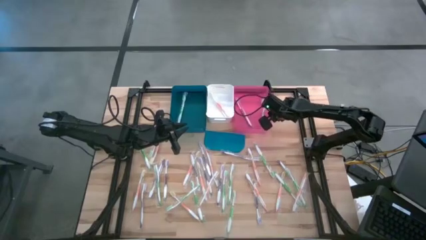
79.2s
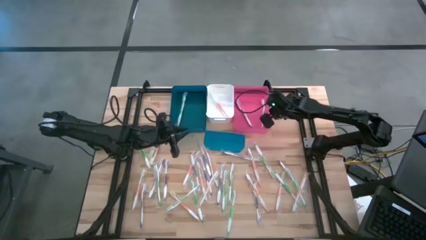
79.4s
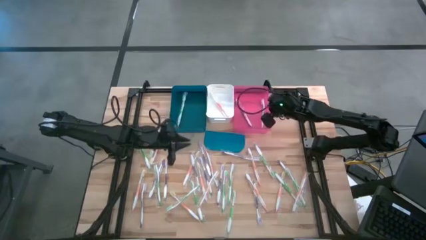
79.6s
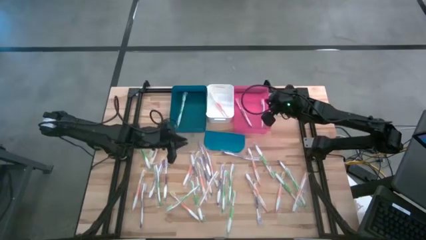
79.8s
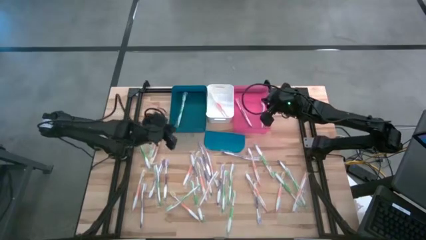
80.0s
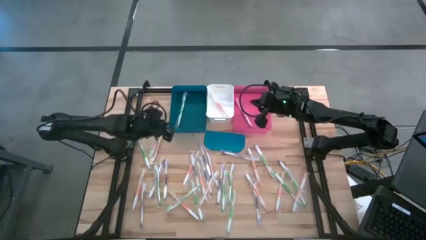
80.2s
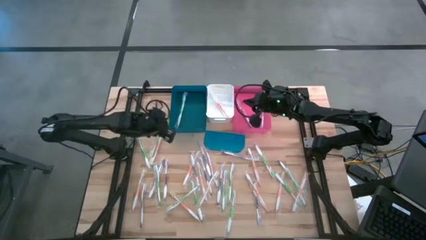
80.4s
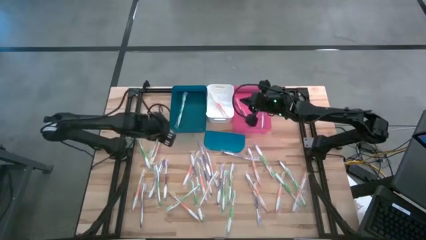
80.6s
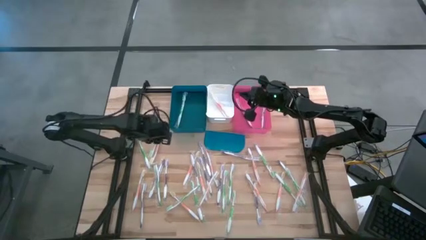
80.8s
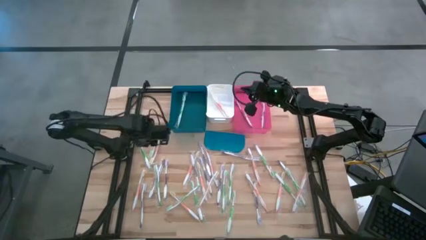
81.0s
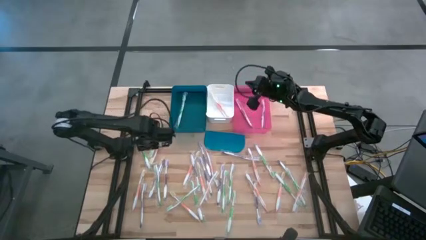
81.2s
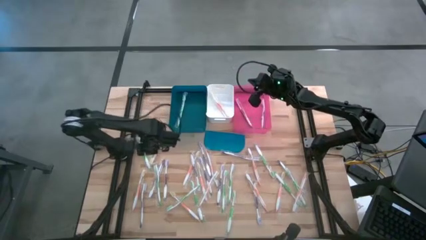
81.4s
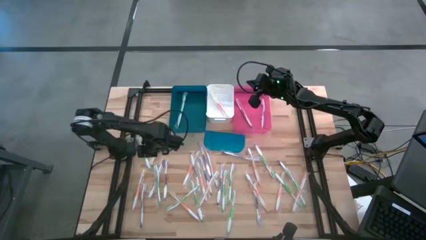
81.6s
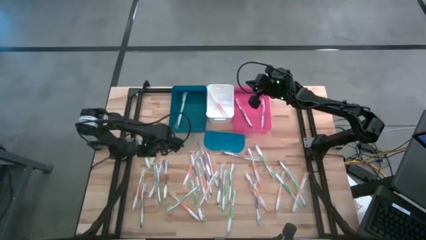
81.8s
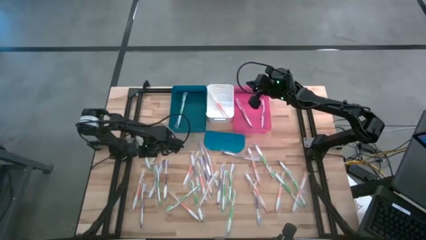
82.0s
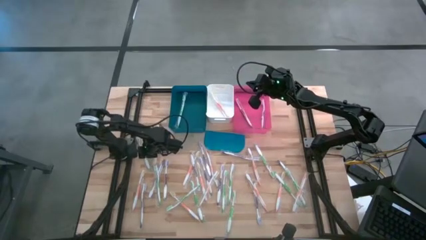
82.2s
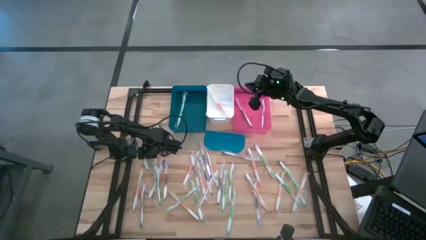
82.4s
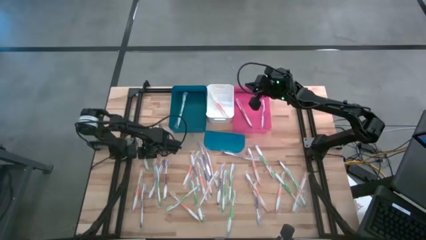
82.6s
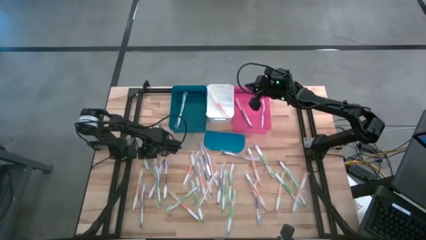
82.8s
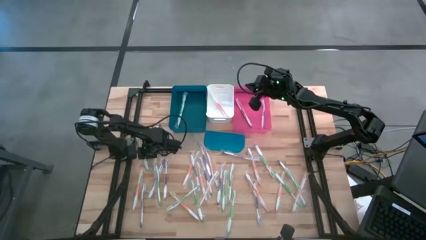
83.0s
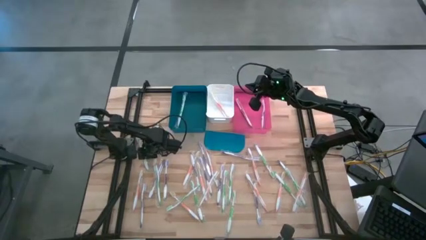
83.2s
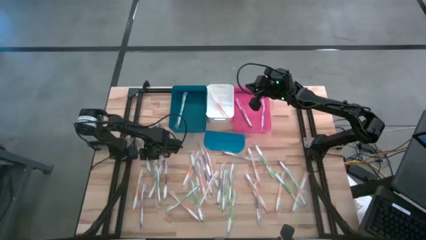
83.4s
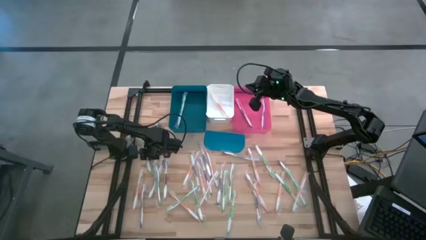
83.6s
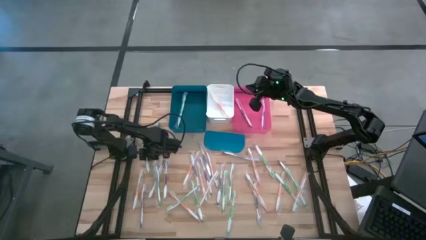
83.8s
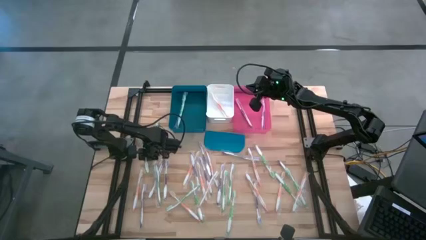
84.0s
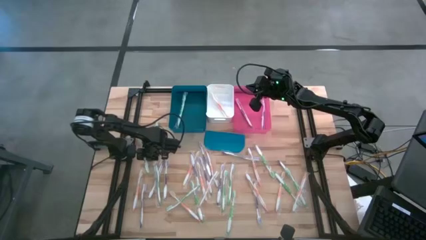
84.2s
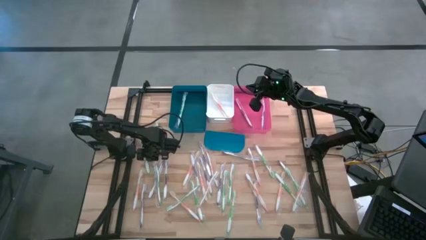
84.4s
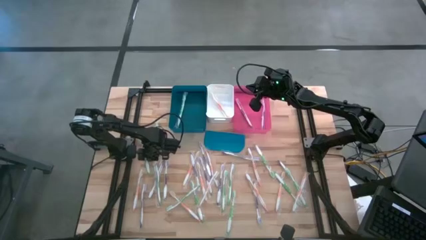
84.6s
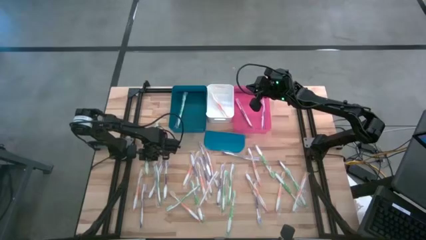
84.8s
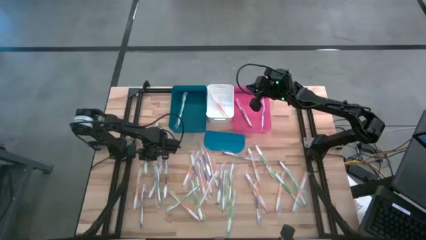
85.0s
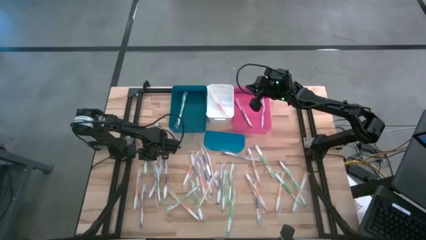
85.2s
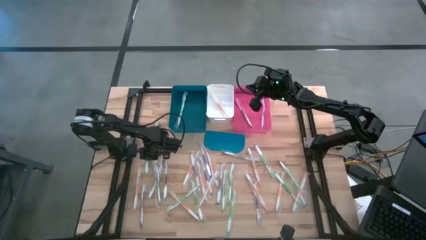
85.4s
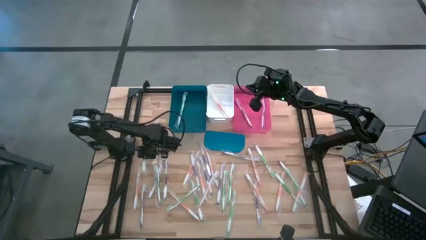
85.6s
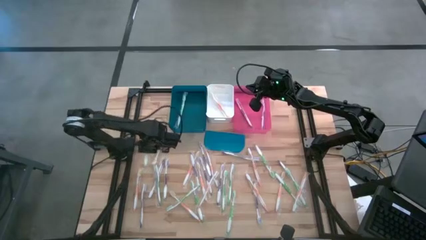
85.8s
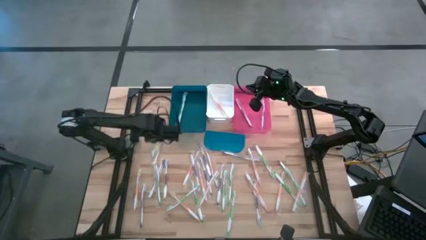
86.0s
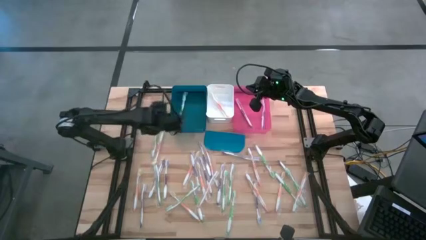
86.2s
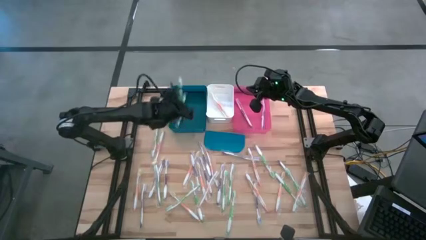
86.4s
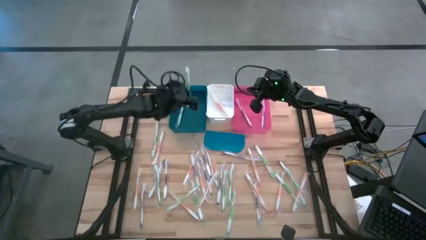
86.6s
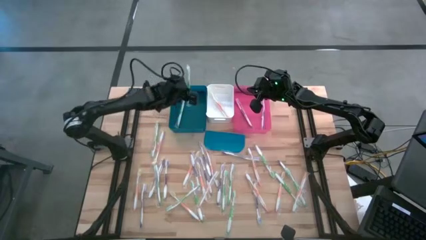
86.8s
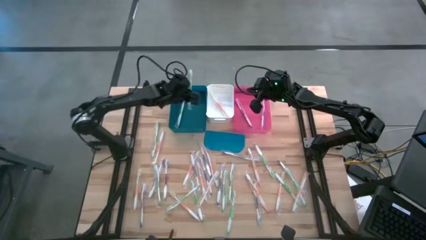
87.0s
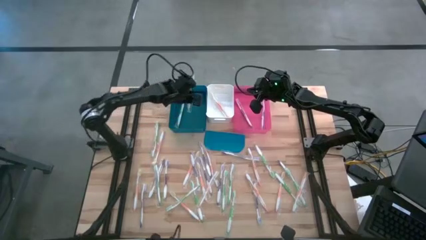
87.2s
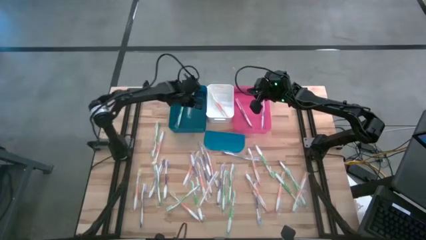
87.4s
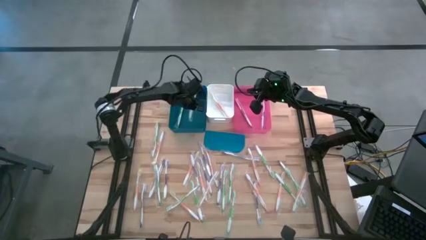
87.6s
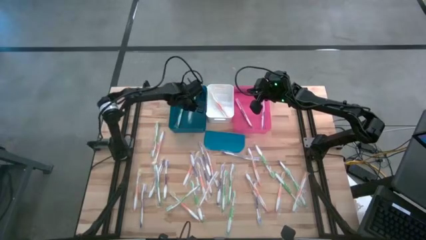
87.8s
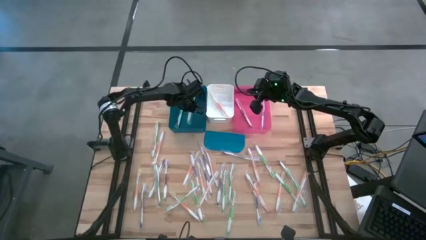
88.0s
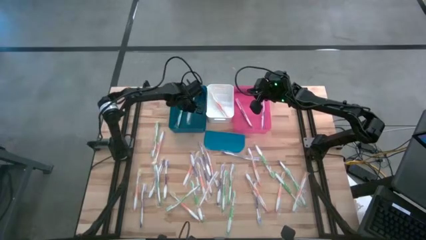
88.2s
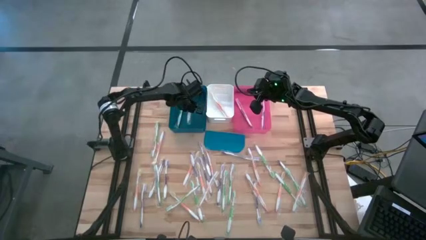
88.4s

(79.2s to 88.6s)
Task: Pick & Place Toothbrushes
Put the green toothbrush into the blue bin

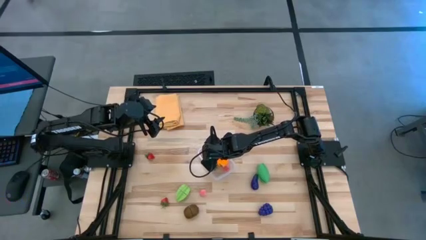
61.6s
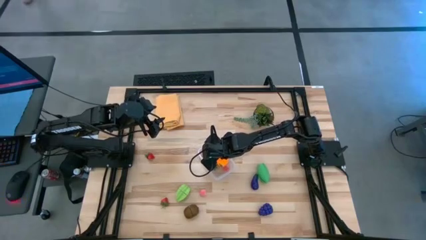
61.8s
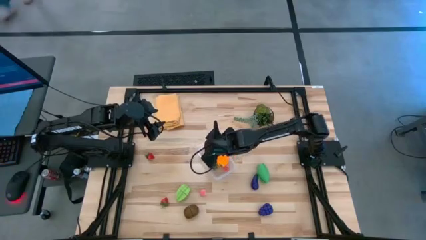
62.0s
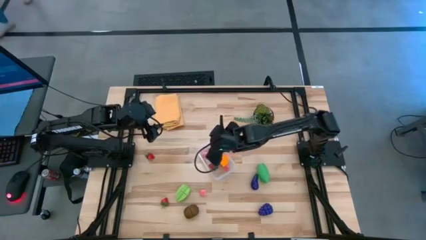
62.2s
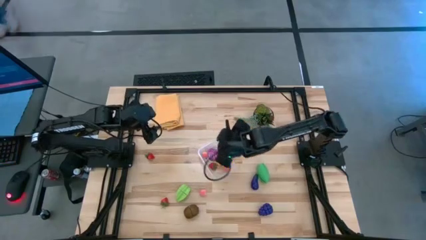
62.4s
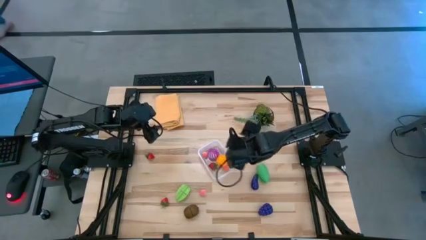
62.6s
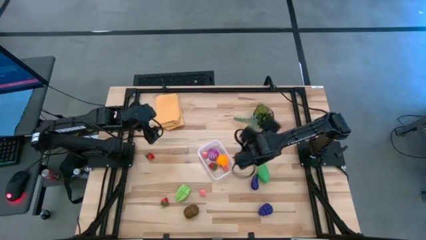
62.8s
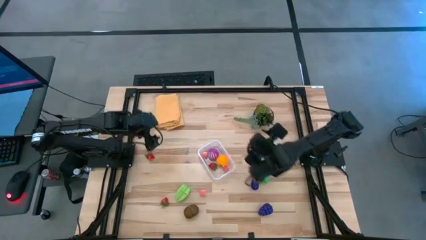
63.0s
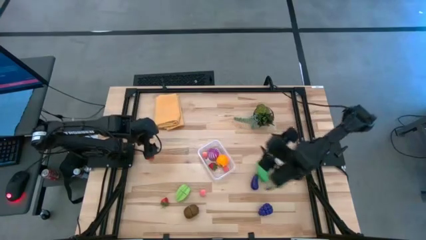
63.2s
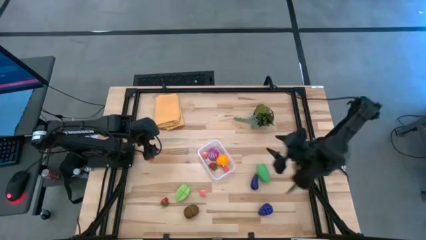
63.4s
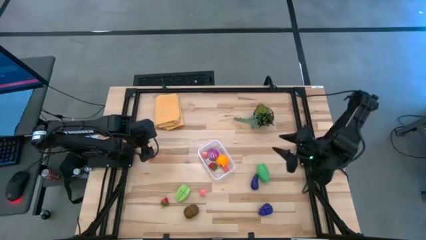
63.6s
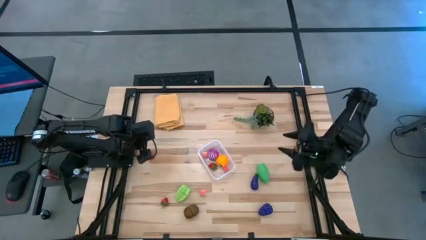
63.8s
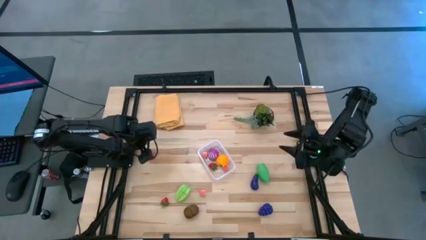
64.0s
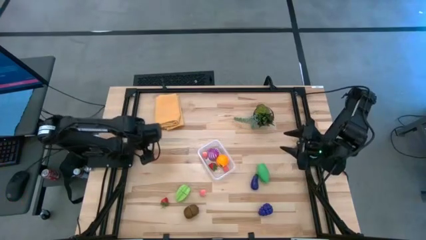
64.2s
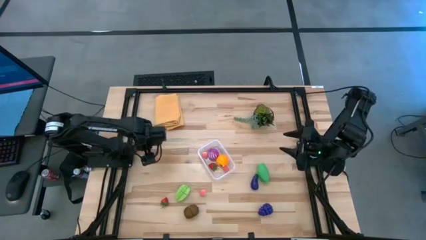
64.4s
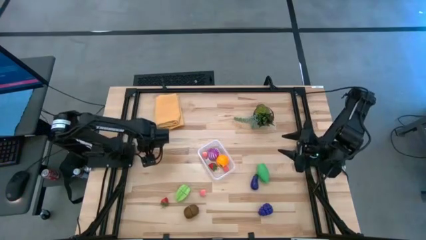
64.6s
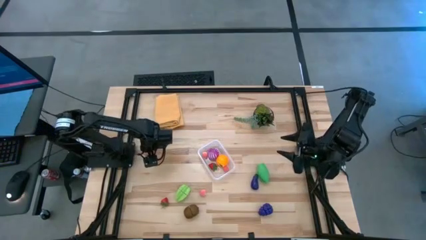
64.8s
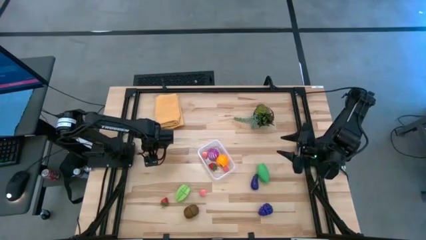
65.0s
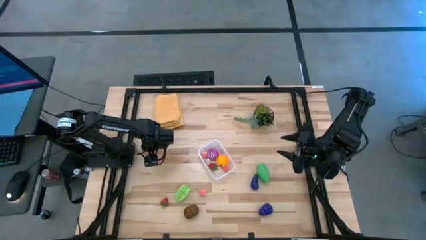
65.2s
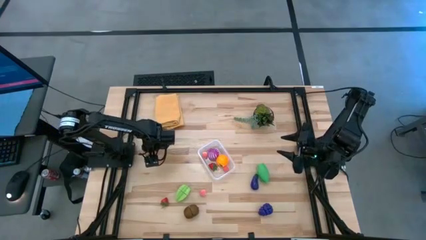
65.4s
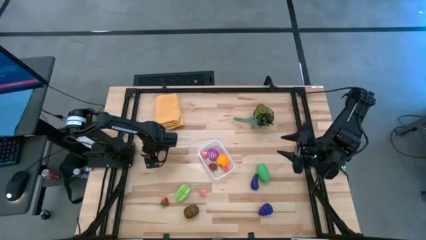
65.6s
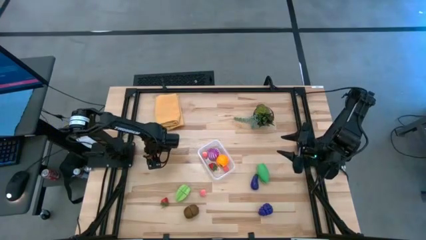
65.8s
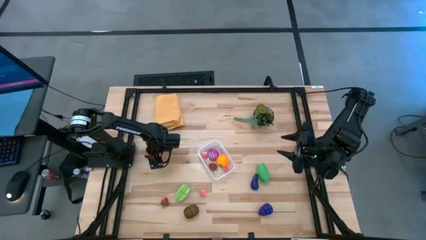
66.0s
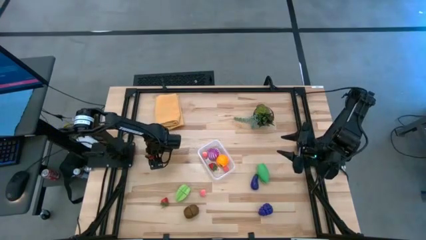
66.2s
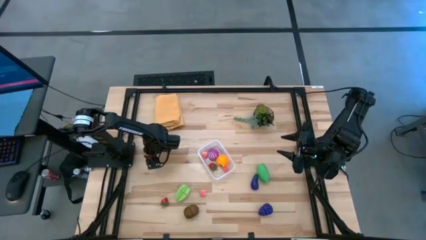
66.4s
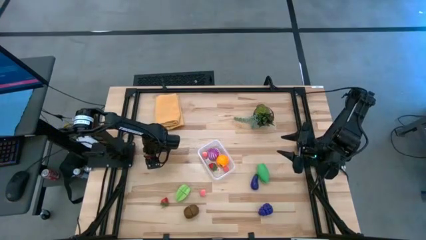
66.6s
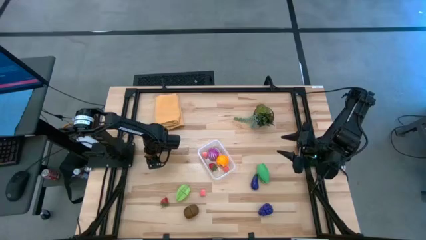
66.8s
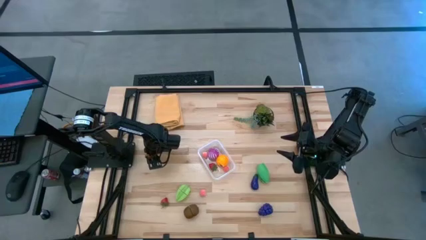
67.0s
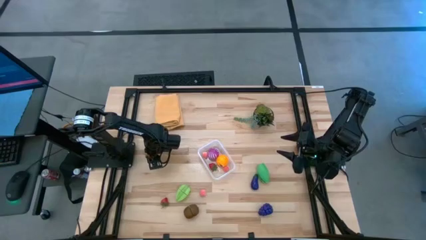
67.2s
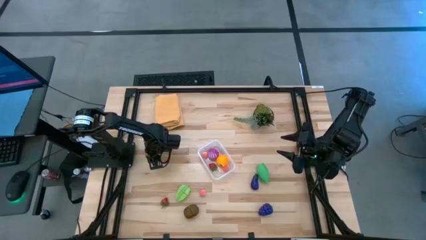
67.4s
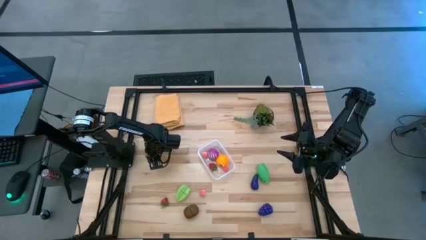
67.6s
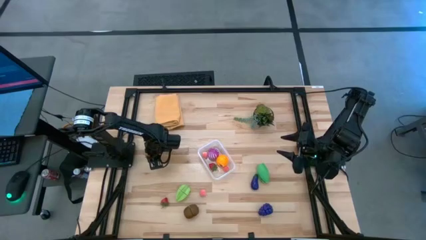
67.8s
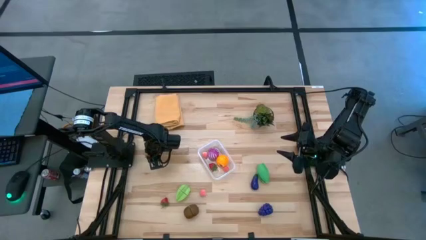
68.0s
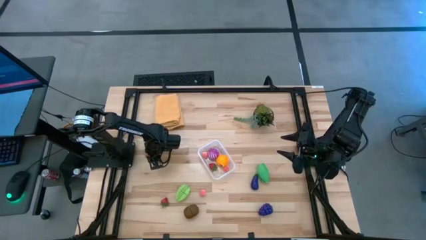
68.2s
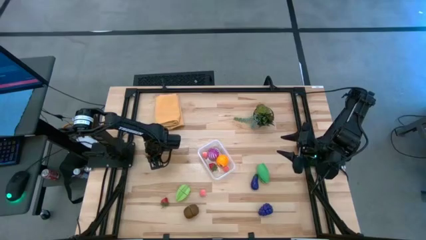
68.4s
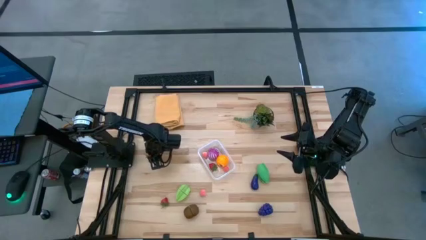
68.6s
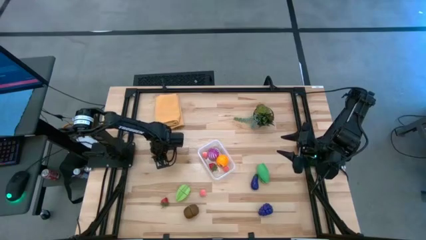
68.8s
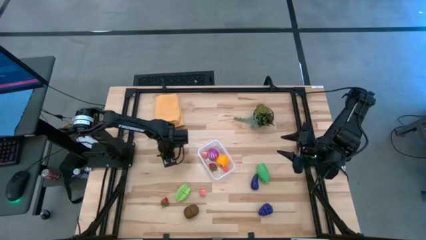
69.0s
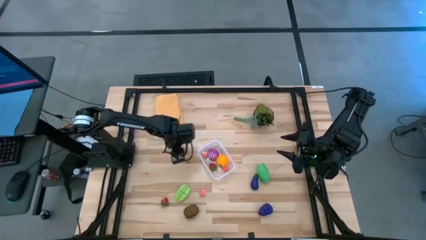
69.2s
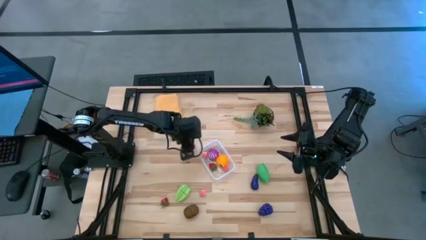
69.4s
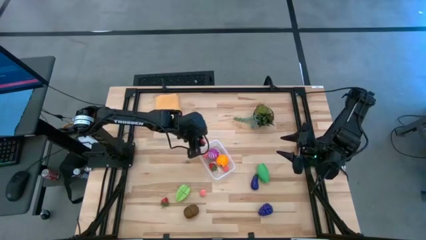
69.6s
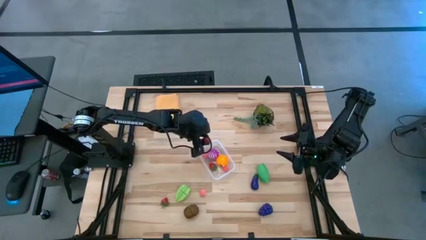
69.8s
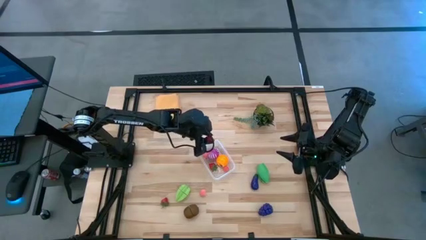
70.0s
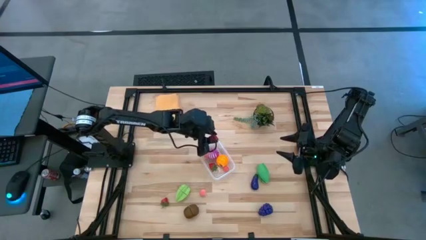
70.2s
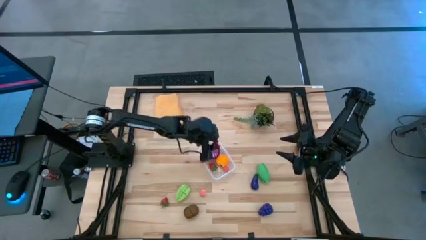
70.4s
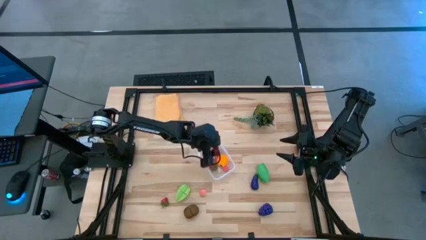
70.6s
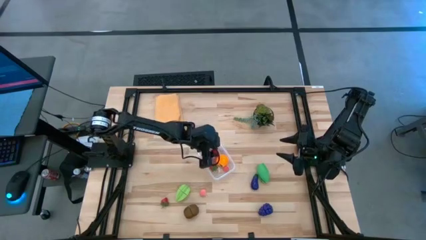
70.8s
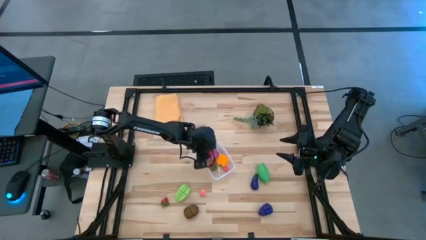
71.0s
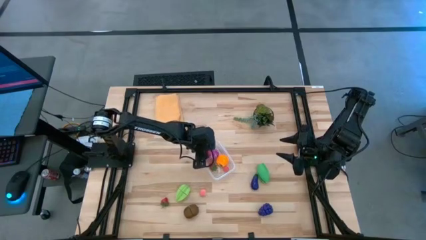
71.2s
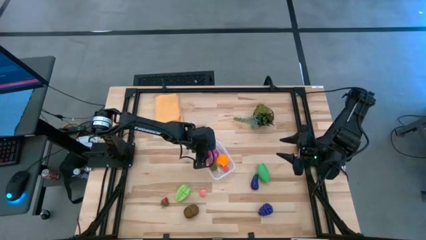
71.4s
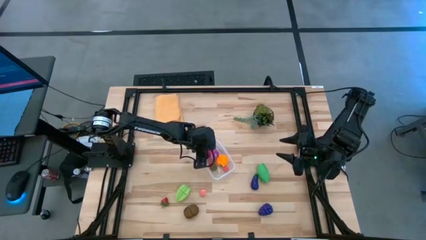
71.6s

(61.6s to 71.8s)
Task: Pick and placing Produce into tupperware
Put the top red strawberry into the transparent bin
